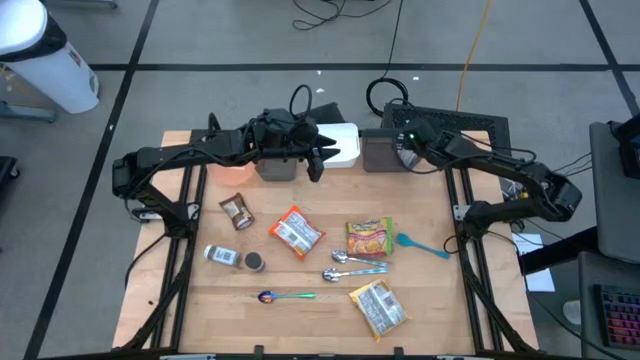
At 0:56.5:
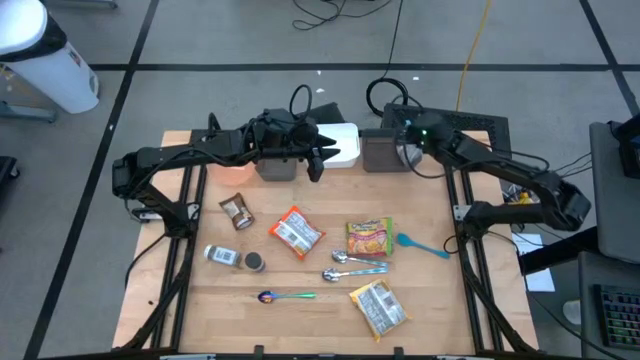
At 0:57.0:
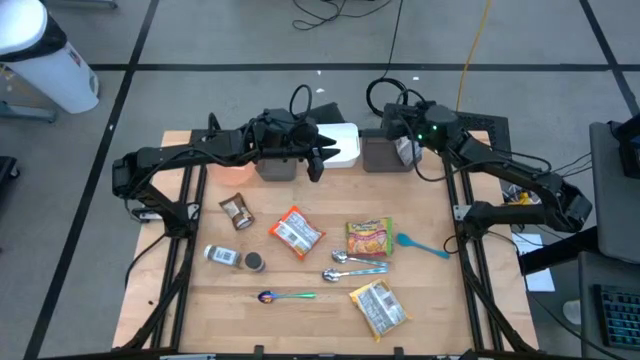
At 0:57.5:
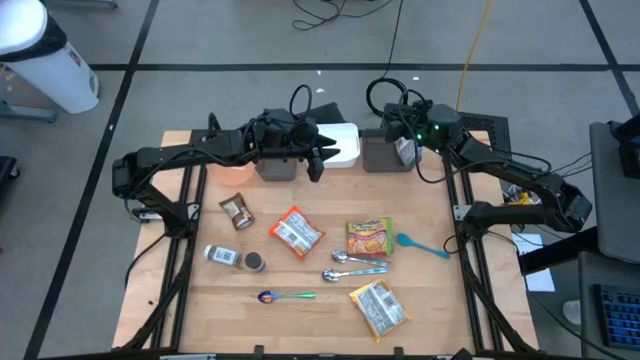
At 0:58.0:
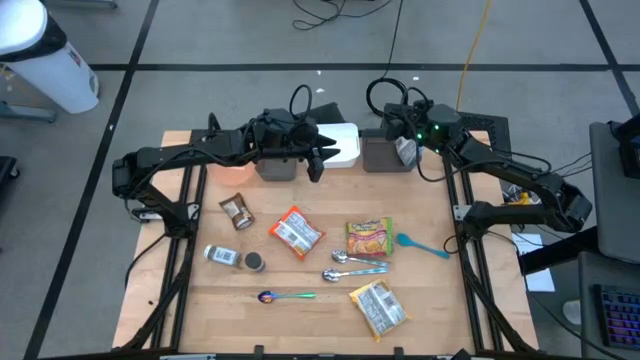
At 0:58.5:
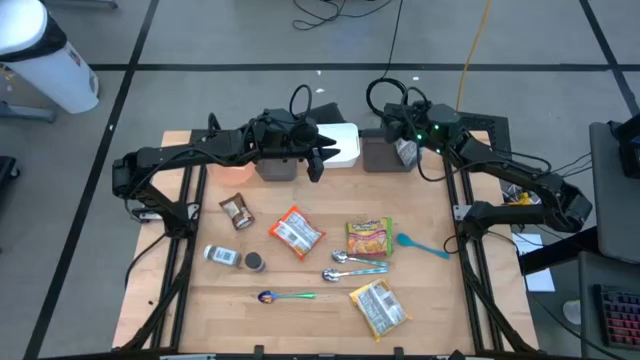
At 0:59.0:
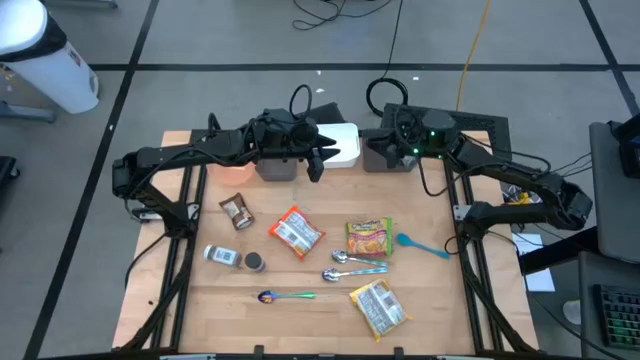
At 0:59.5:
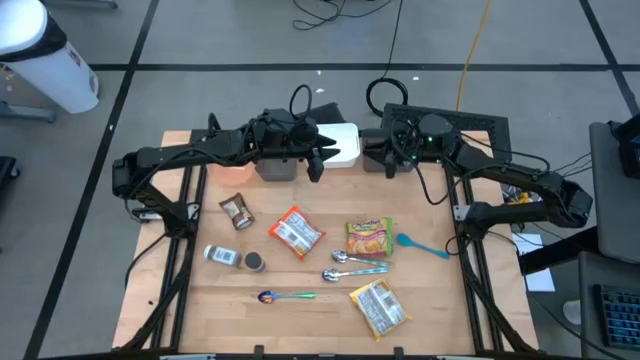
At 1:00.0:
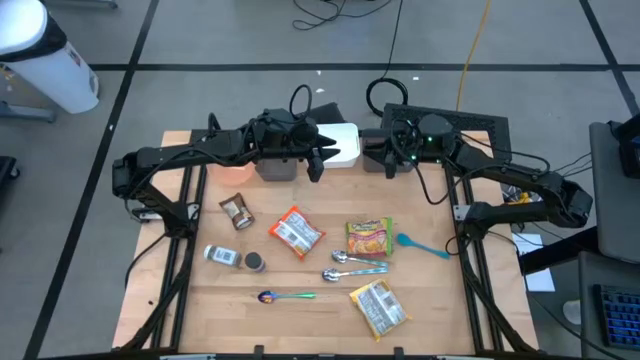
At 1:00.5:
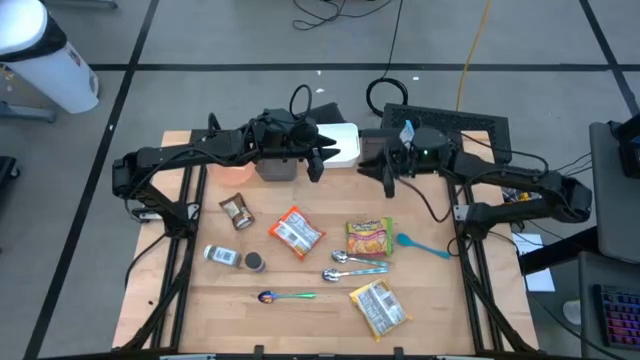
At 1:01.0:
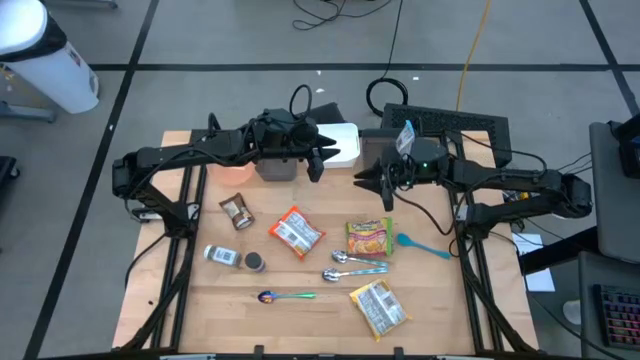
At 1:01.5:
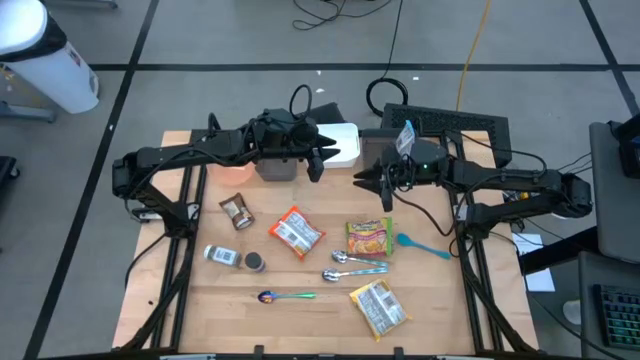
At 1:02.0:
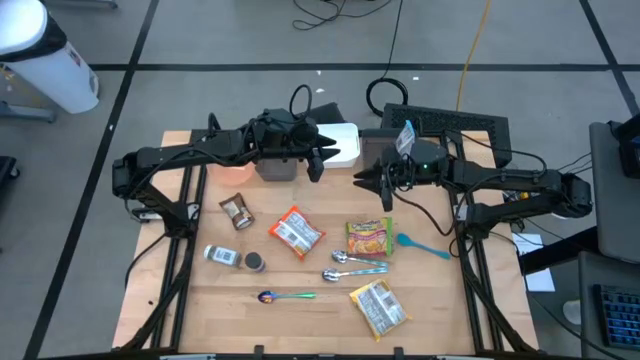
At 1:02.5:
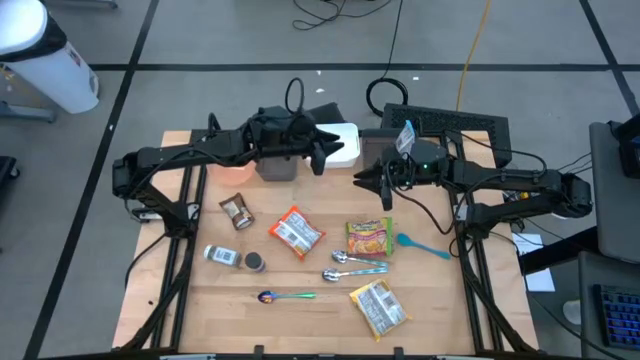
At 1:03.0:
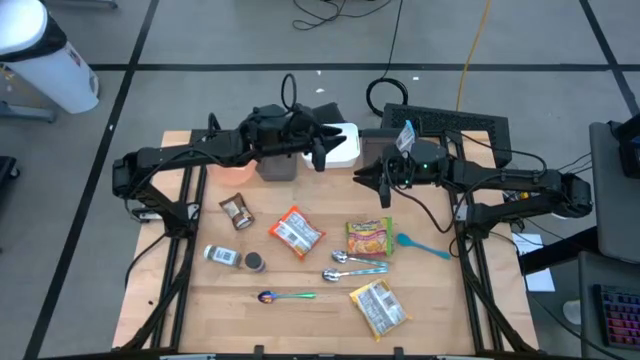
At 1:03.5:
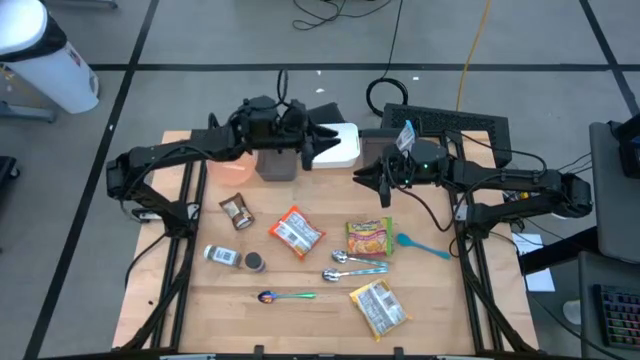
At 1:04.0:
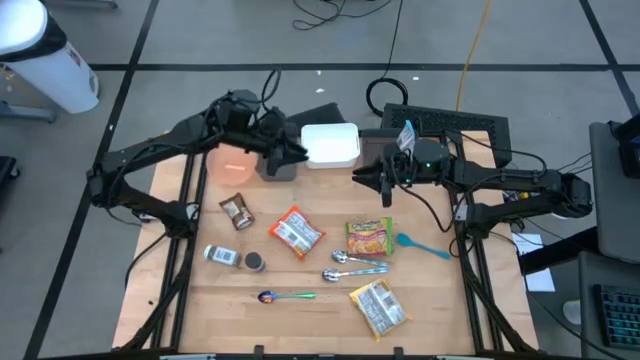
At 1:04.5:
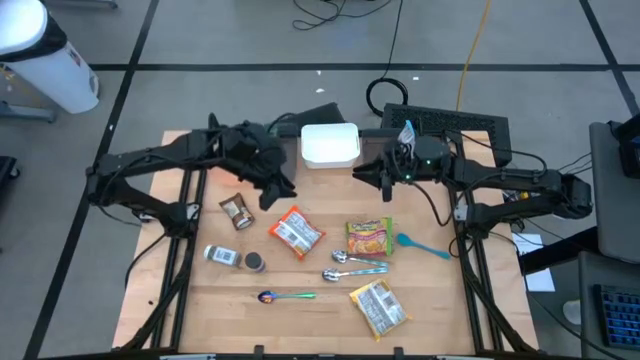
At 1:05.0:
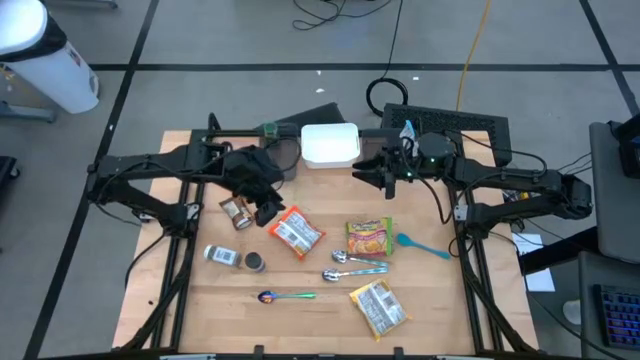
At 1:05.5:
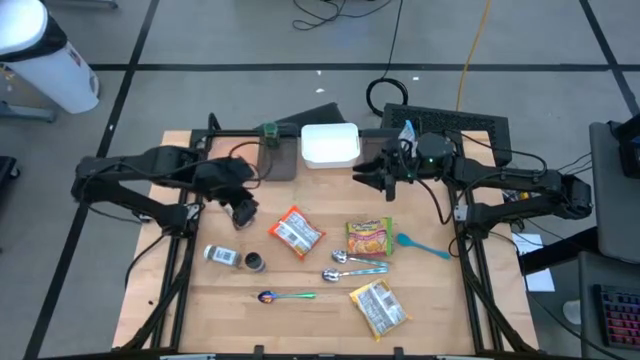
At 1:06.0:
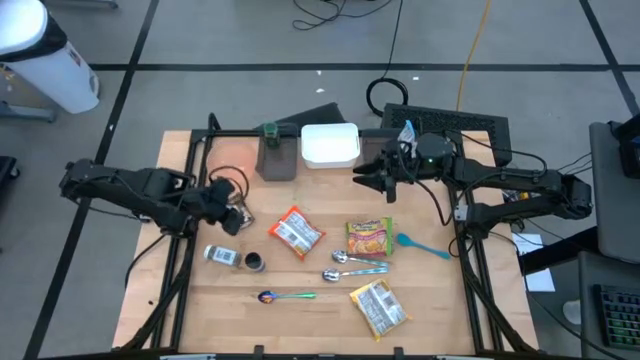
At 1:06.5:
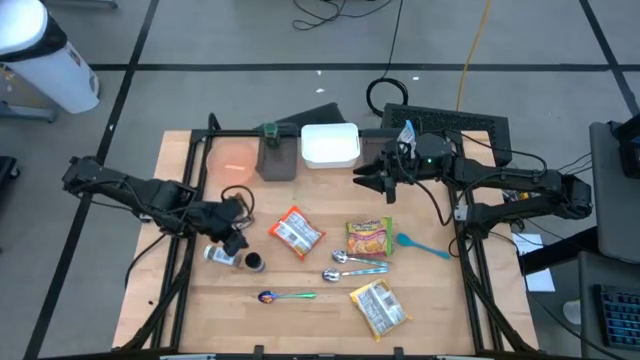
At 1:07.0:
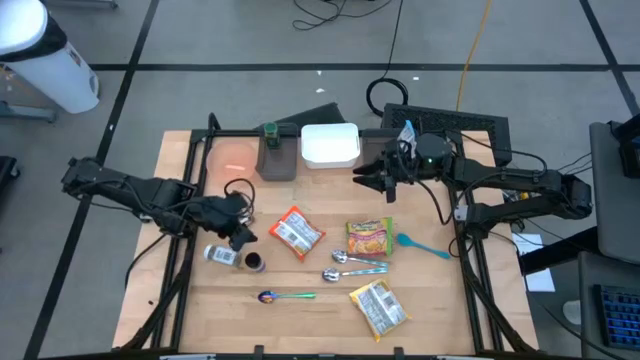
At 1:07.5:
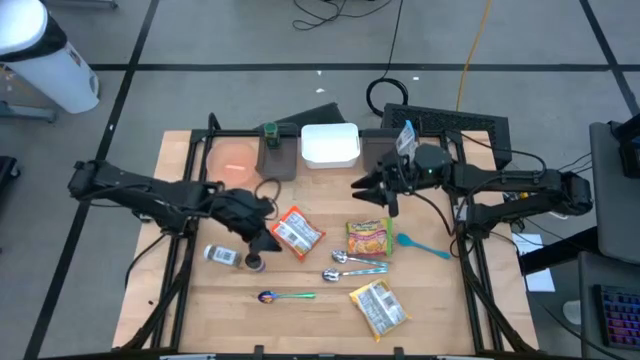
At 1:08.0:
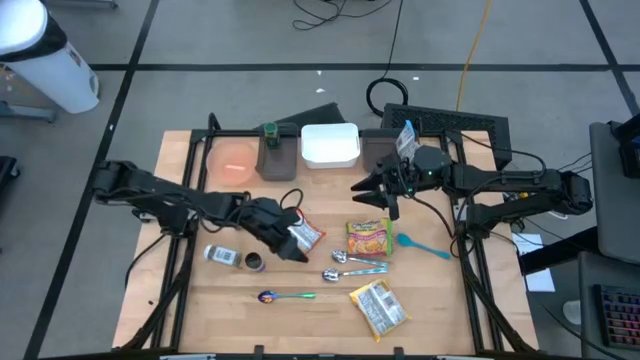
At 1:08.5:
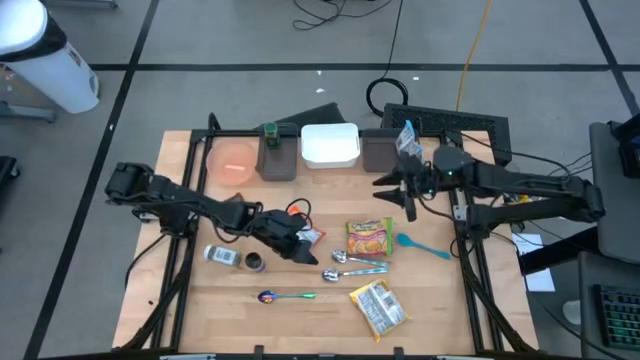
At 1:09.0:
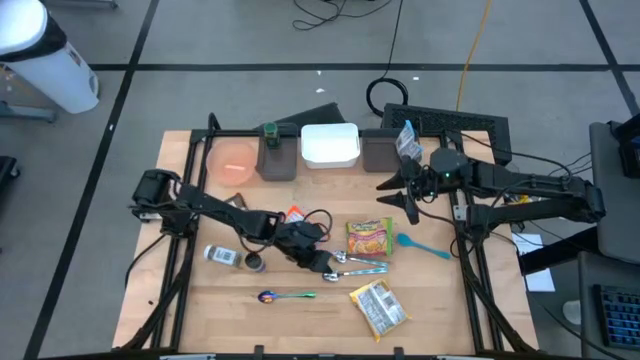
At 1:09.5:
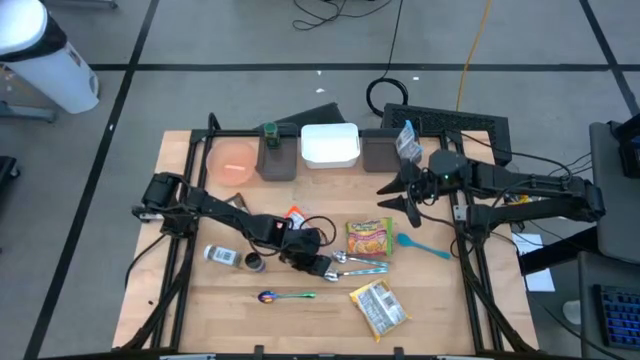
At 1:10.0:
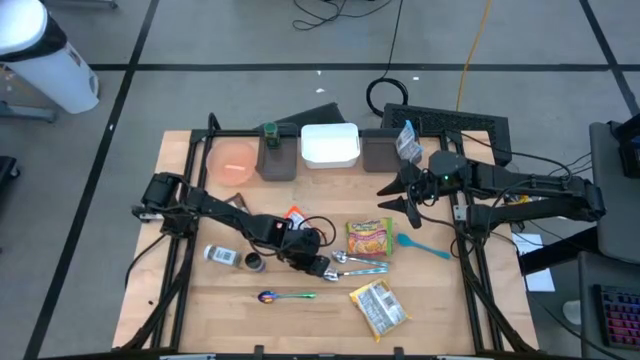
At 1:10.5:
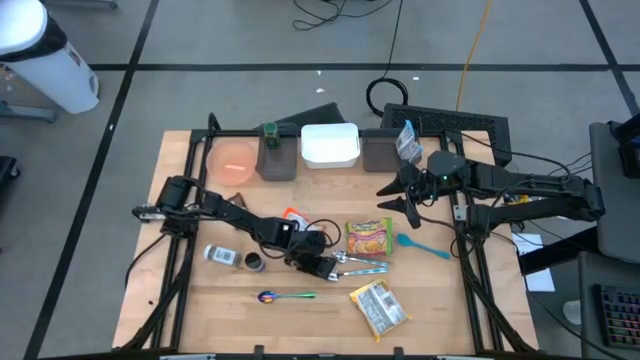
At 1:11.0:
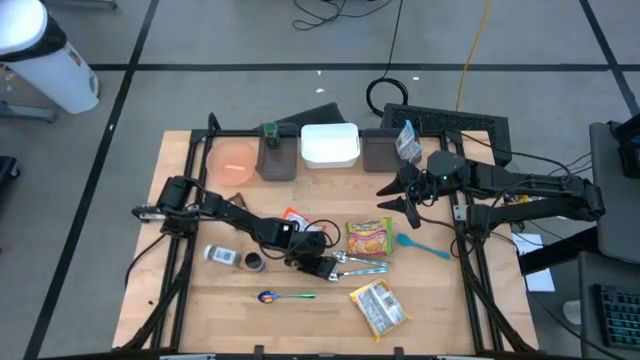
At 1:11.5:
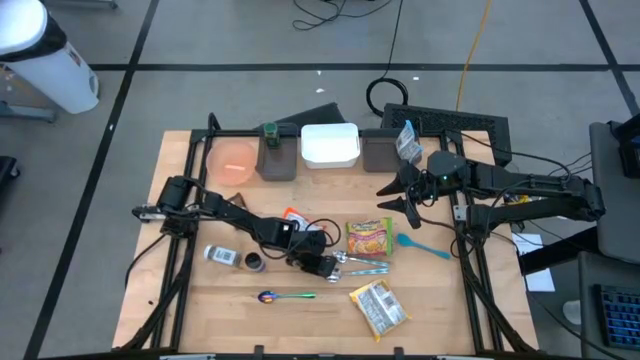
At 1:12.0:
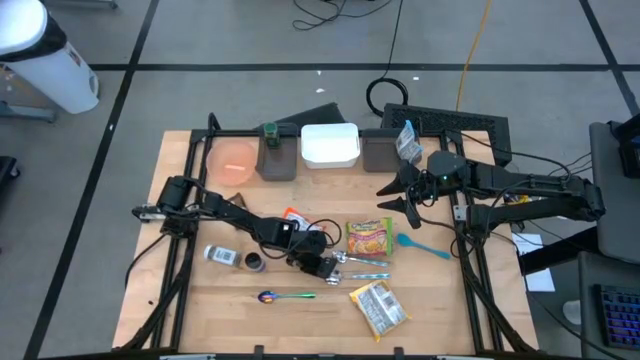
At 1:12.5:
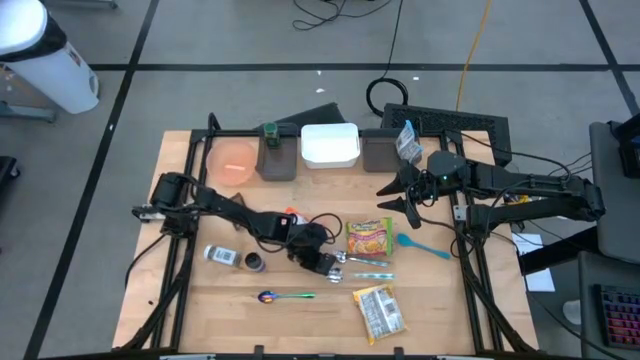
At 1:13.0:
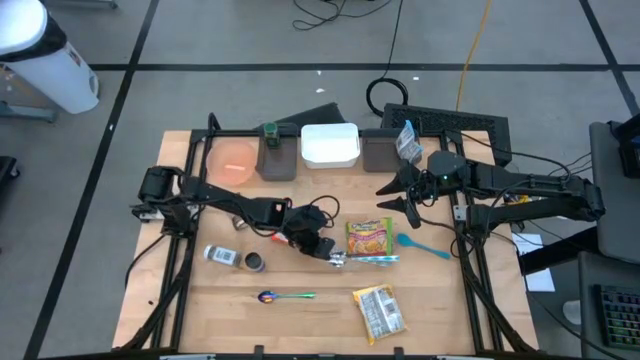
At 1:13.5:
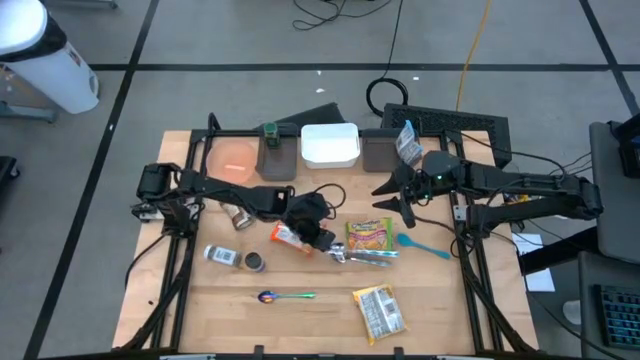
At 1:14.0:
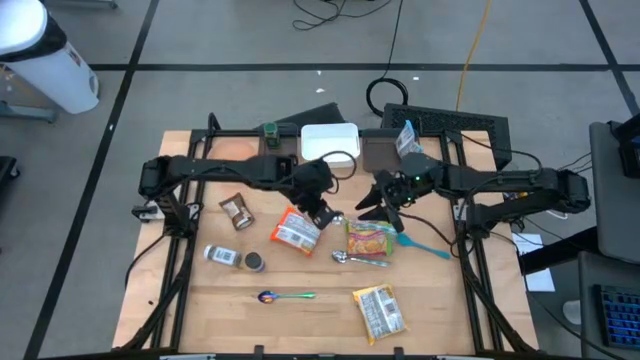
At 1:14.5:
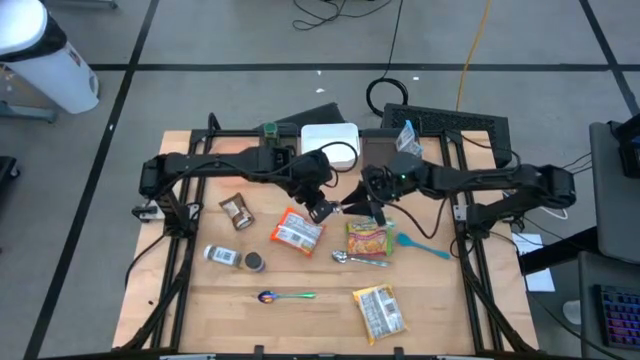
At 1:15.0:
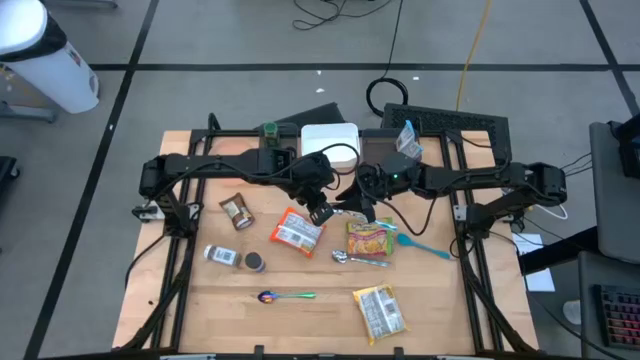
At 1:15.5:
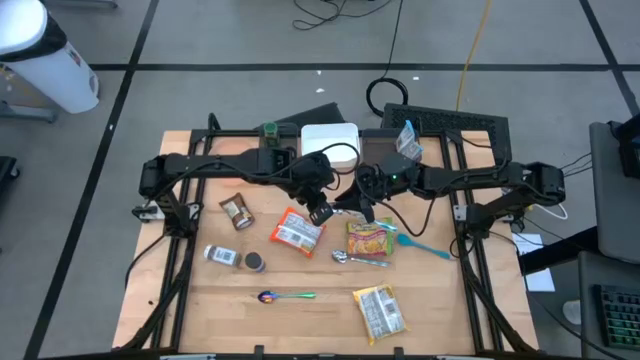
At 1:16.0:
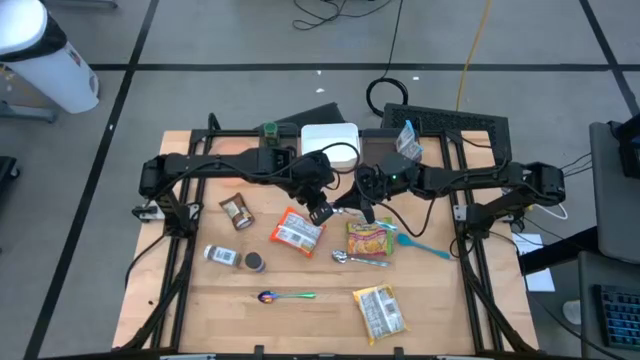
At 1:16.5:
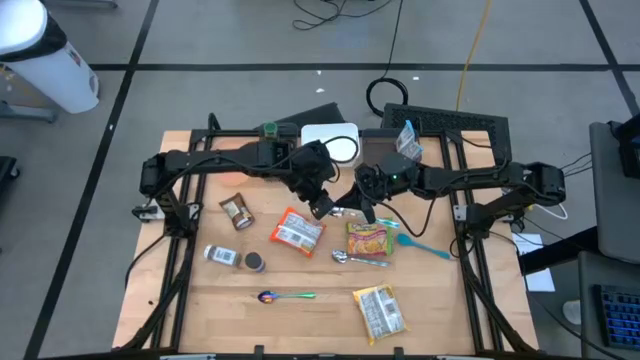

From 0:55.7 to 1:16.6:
Task: Pick & Place Food Item
Put the bottom blue spoon into the white bin
